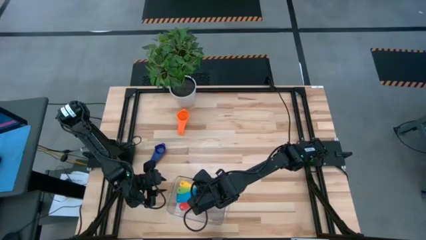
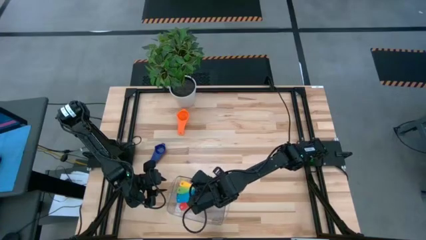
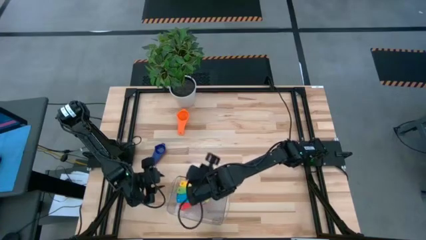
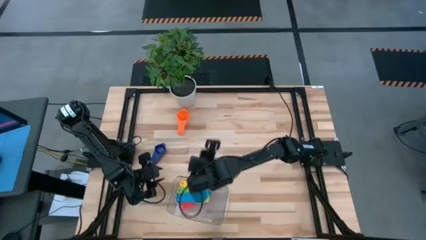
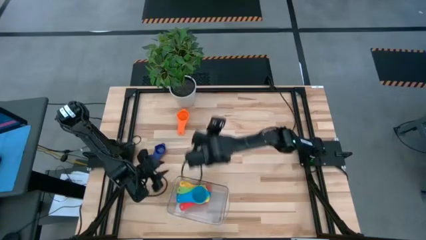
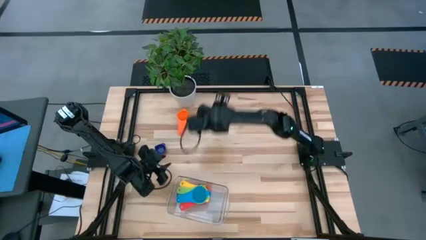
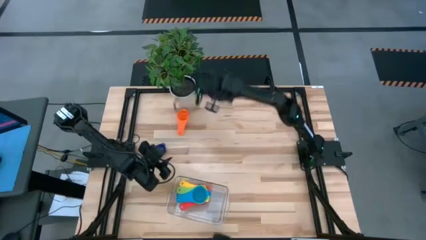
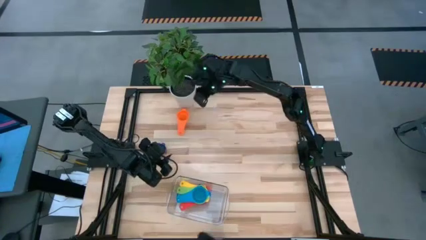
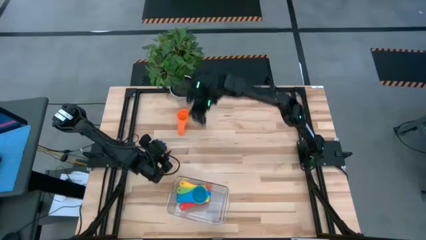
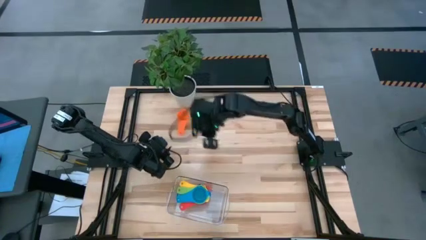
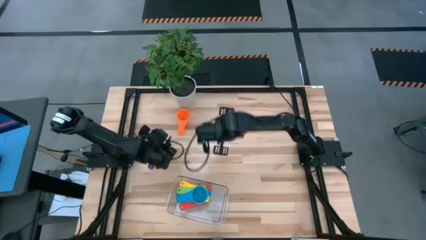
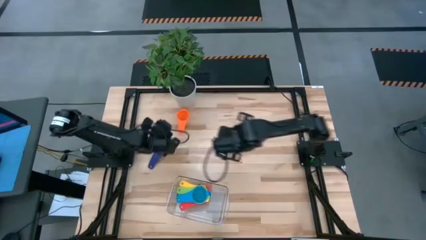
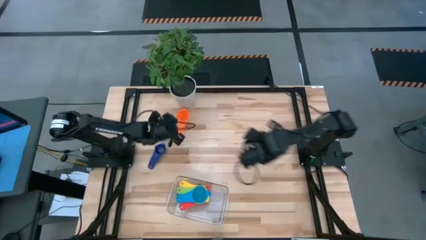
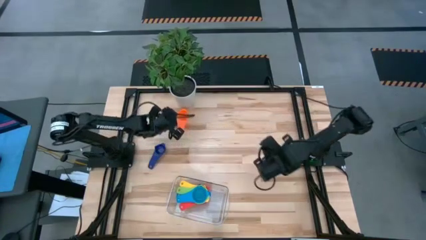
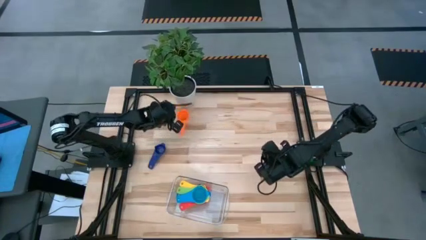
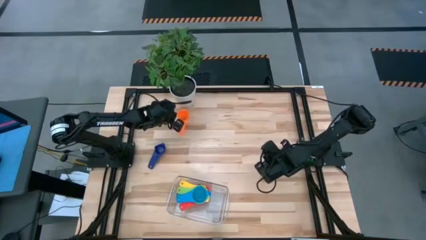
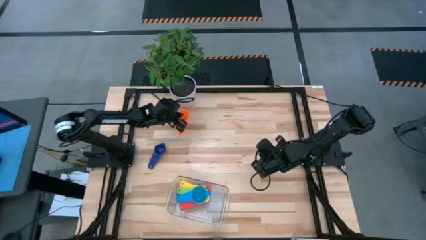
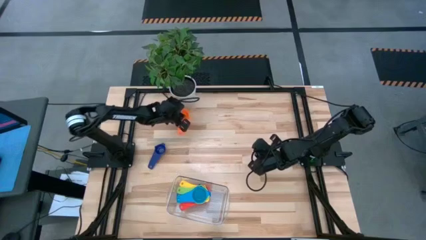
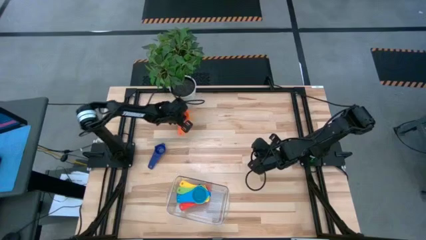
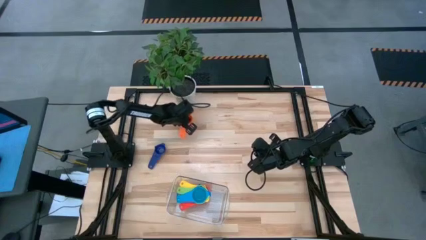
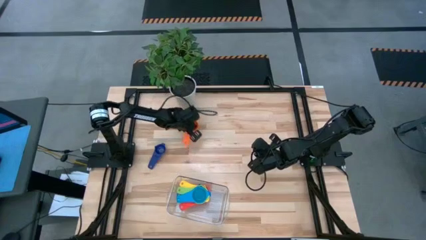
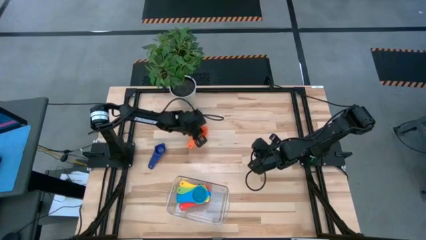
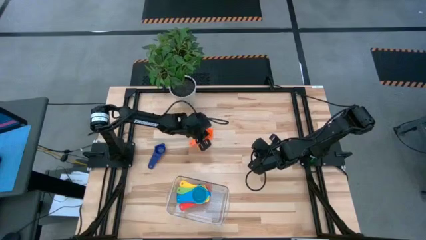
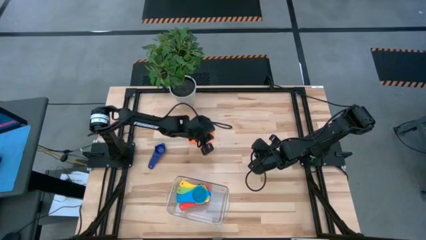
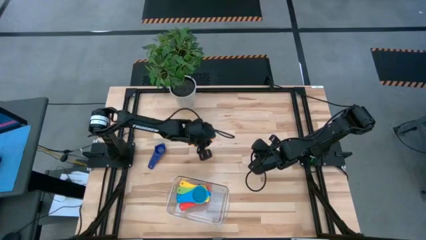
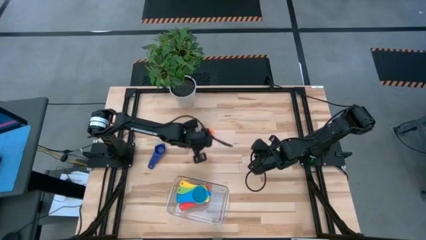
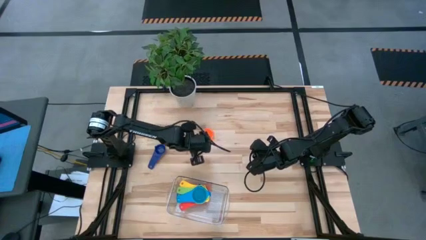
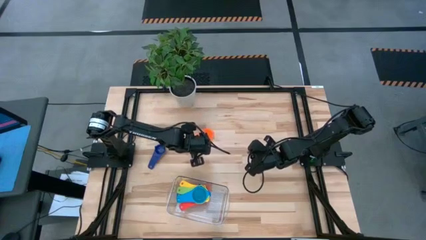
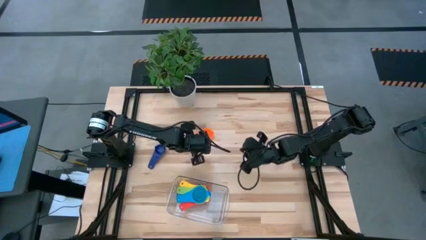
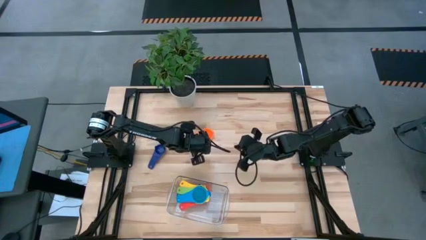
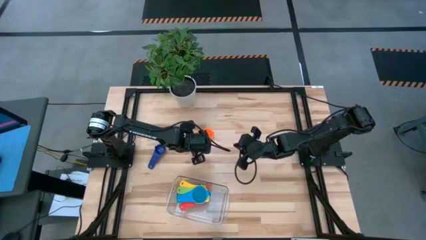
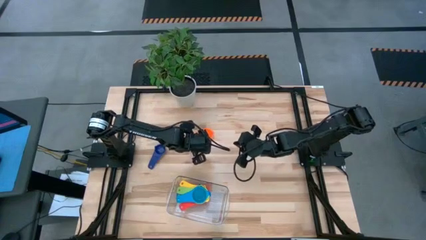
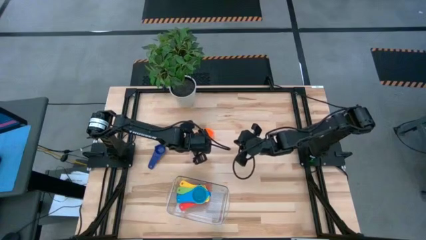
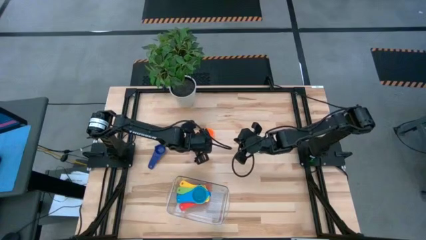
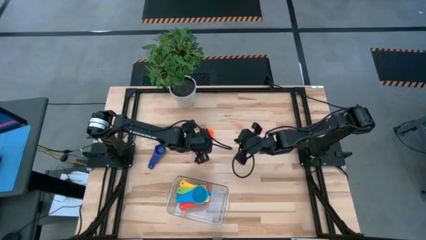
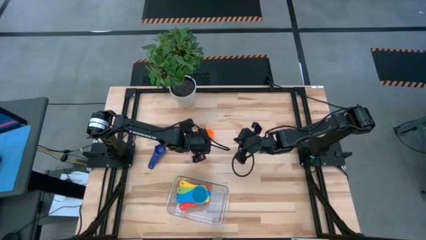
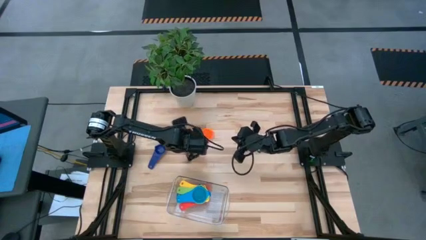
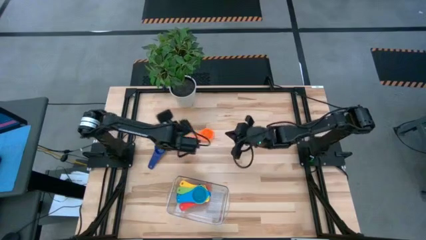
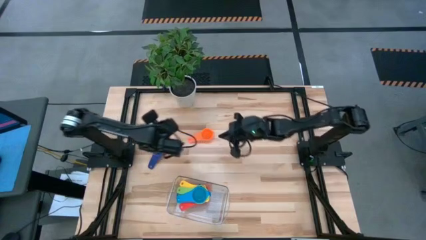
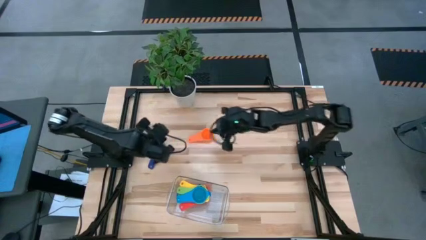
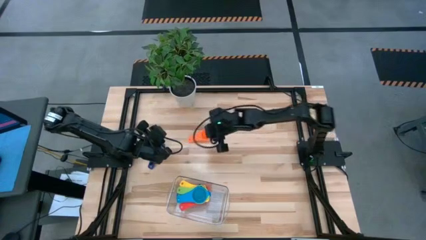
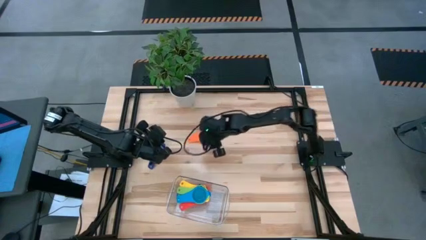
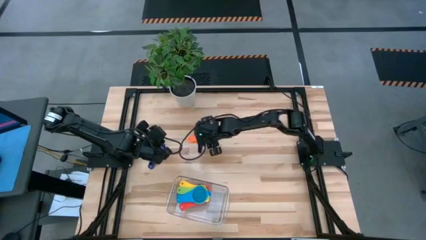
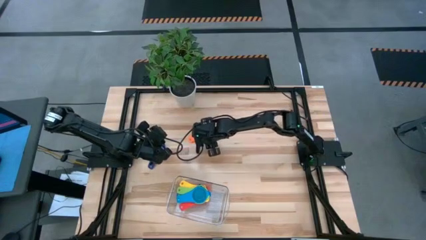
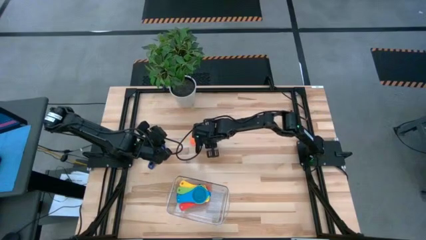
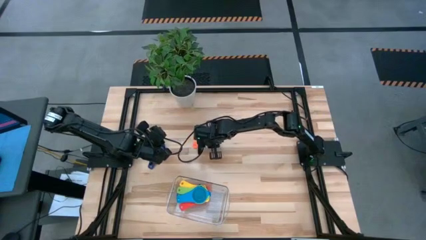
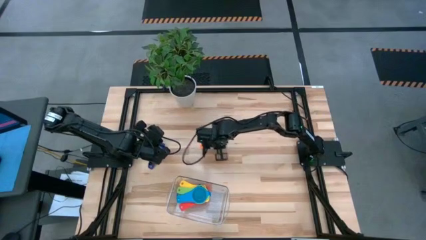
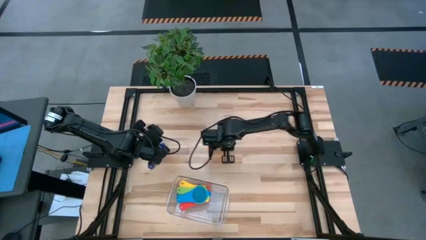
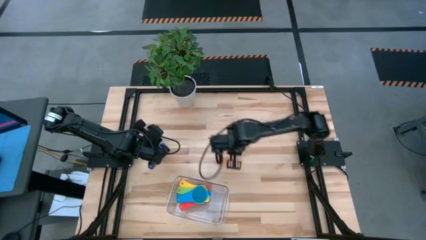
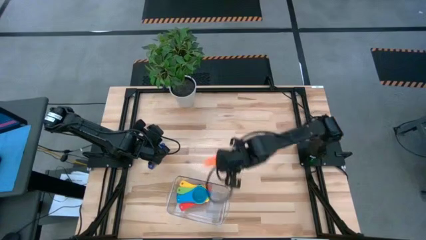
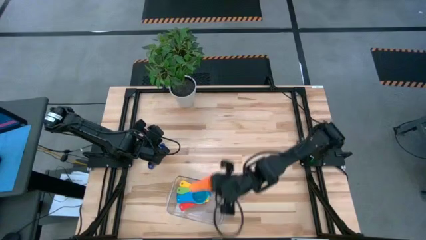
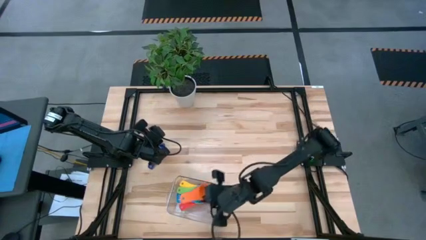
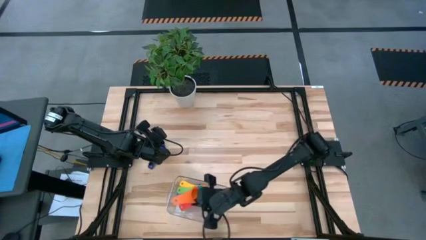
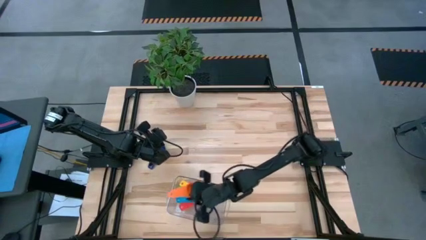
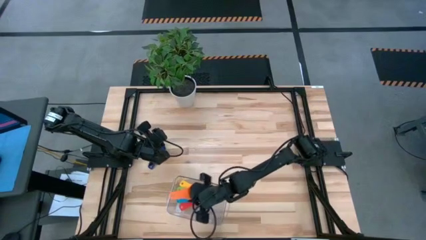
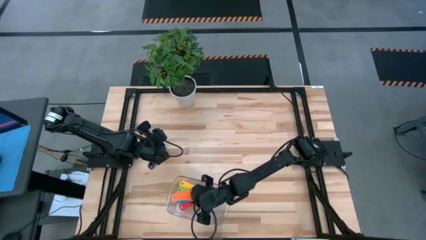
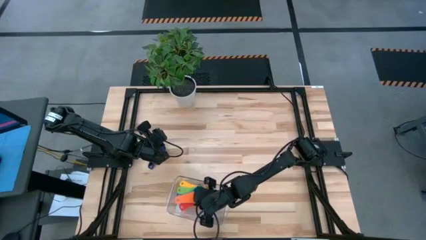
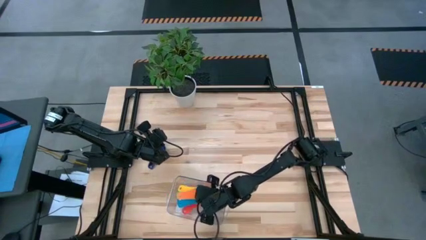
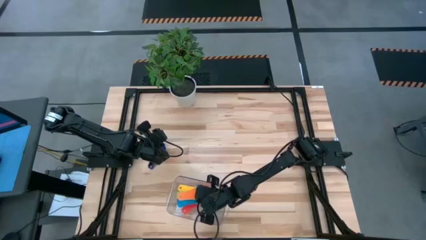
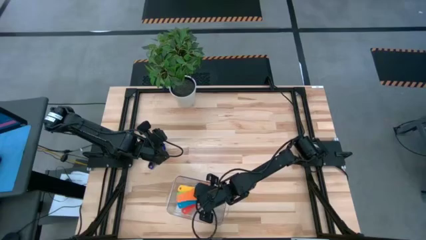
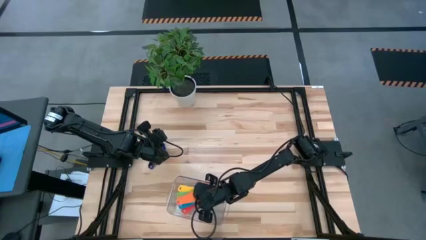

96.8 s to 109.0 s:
Task: Nest measuring cups in basket
Stack the orange measuring cup on top of the light blue measuring cup

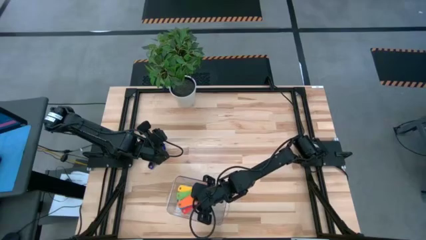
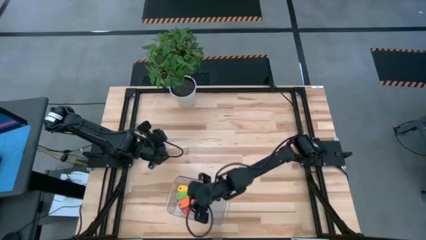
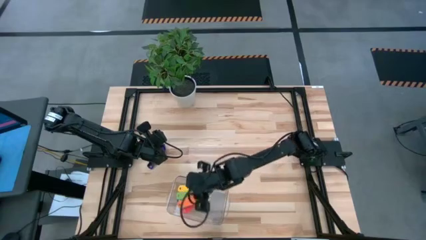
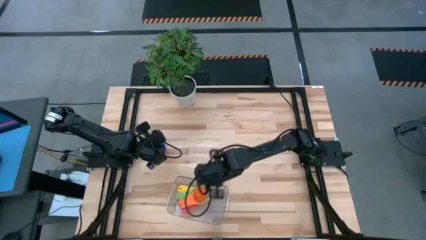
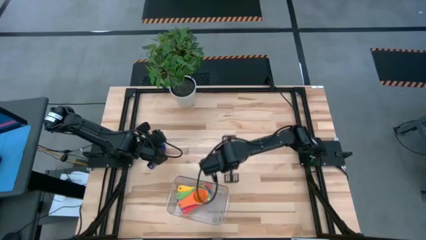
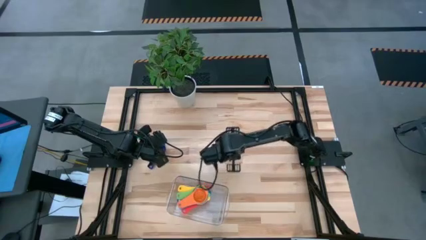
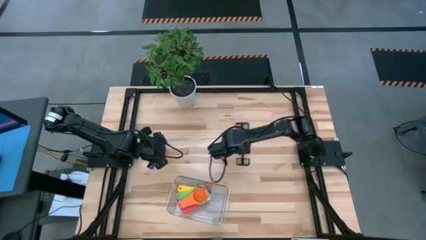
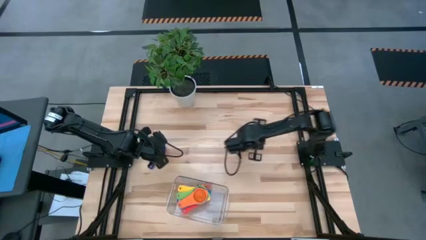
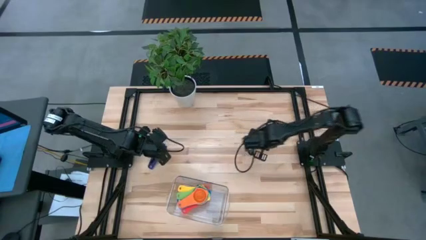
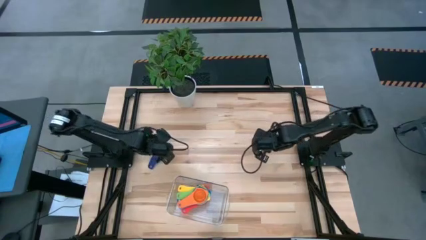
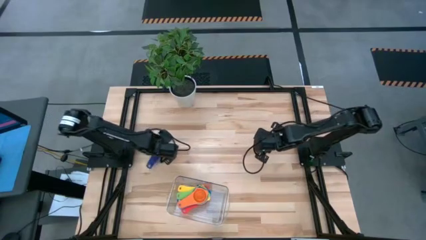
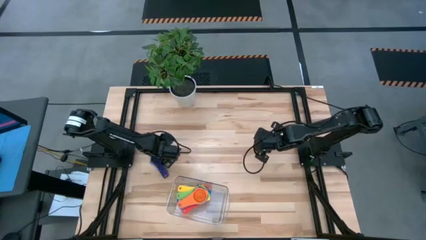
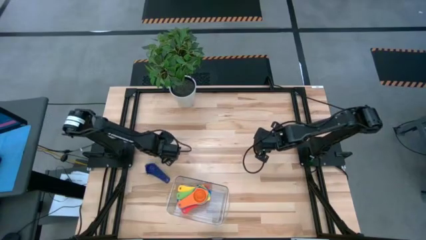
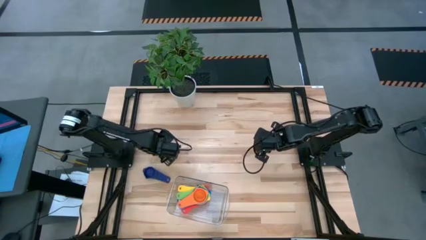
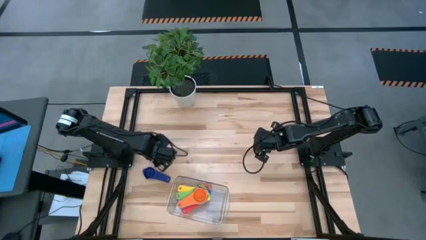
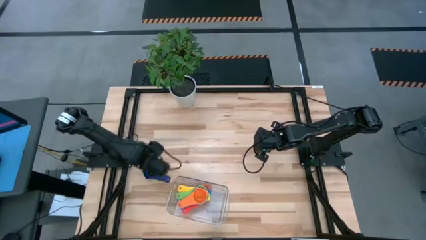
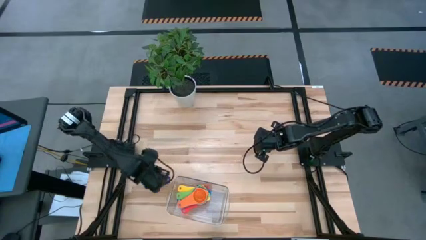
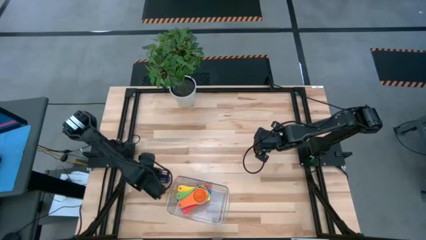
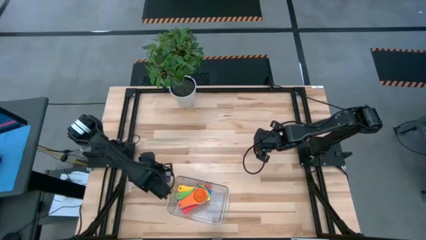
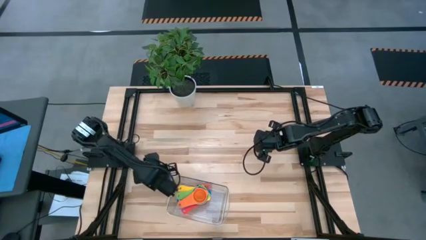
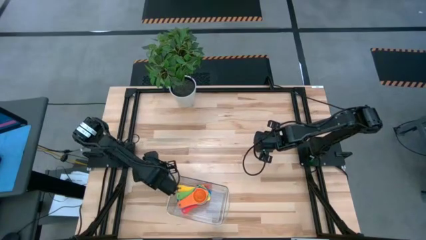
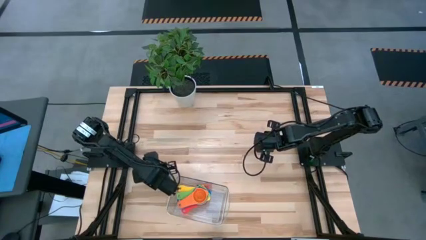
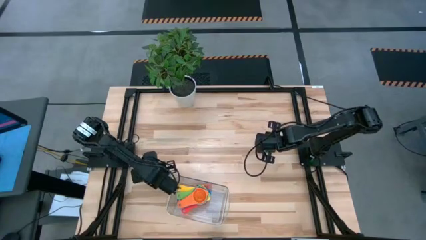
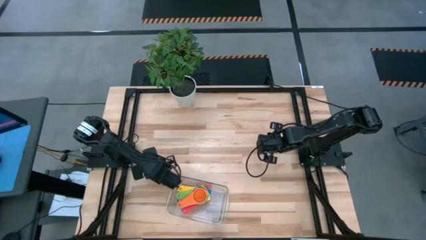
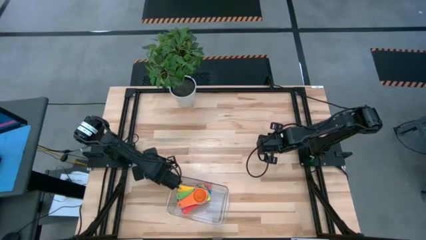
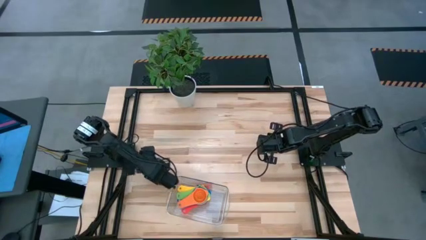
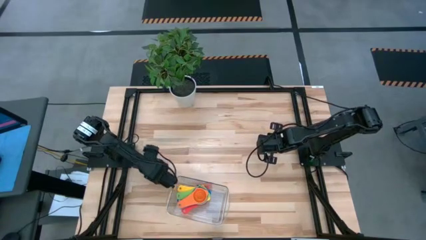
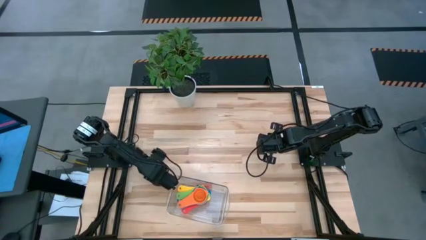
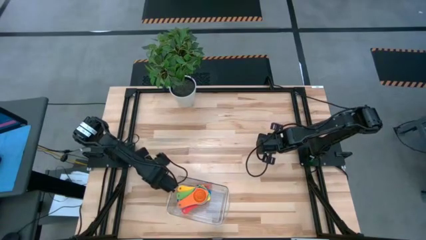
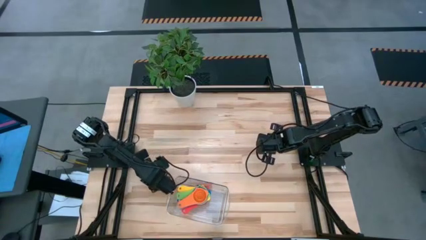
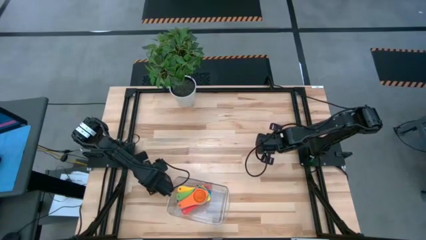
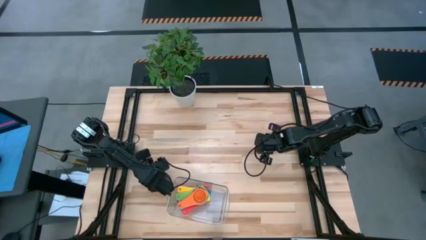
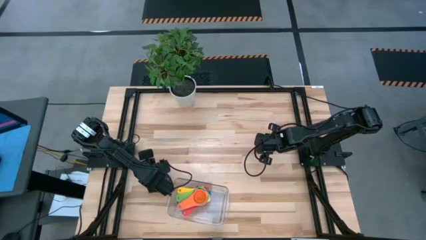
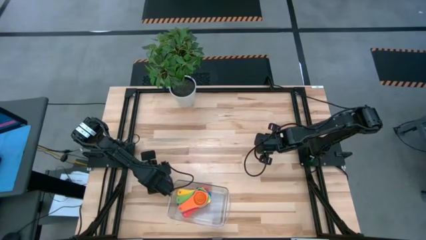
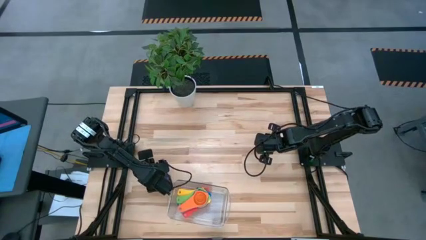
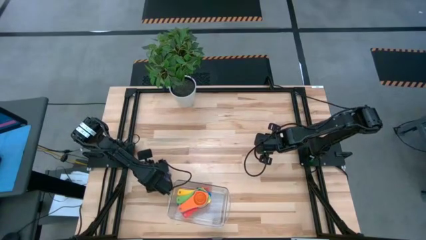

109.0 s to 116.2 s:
Stack the dark blue measuring cup on top of the orange measuring cup
